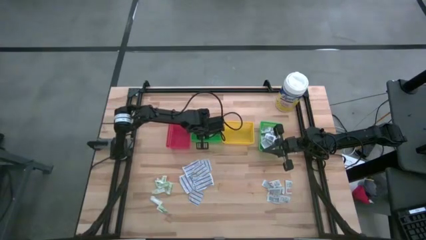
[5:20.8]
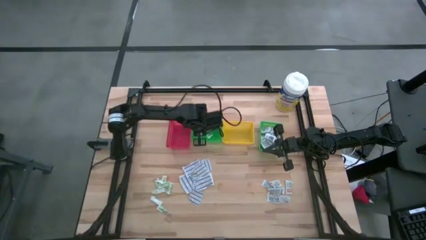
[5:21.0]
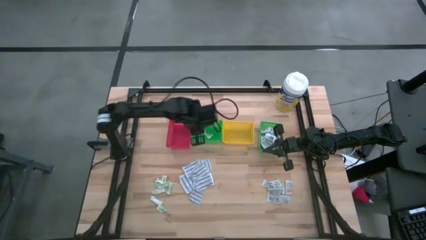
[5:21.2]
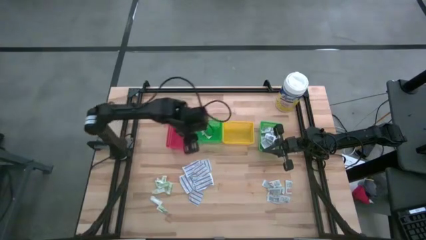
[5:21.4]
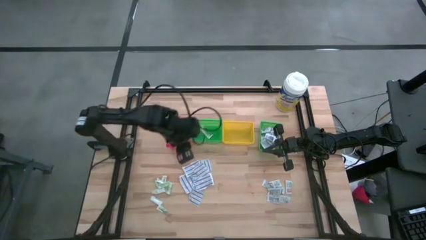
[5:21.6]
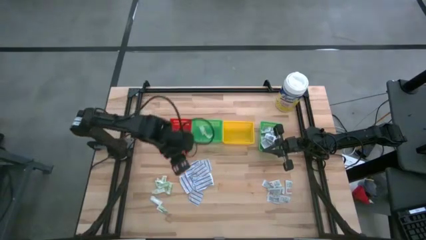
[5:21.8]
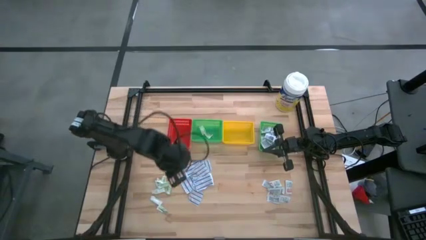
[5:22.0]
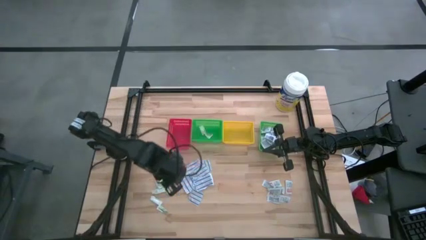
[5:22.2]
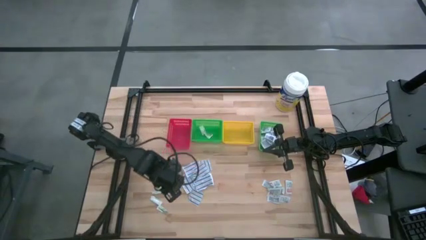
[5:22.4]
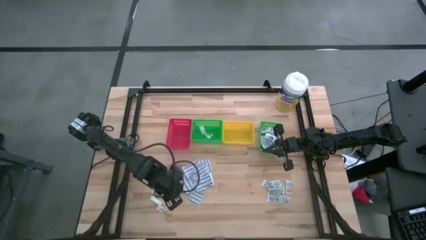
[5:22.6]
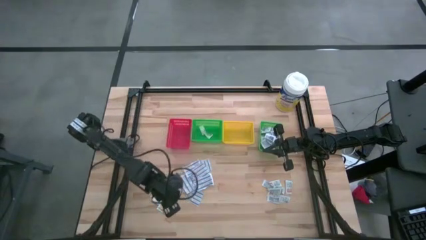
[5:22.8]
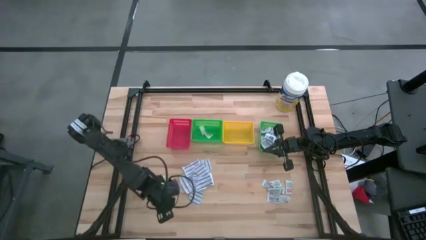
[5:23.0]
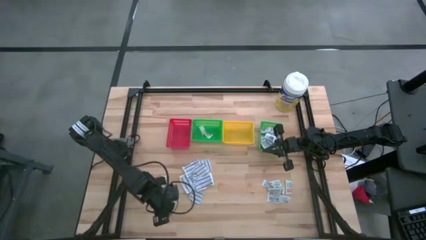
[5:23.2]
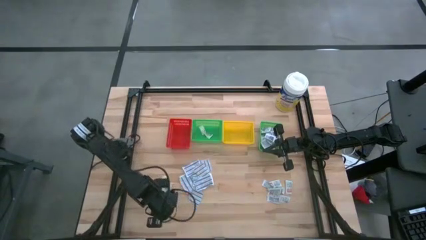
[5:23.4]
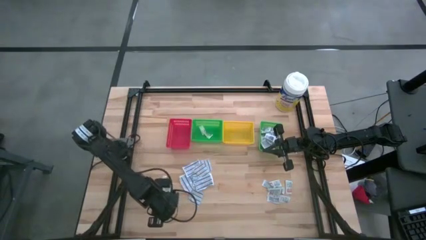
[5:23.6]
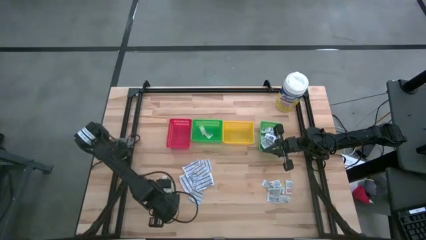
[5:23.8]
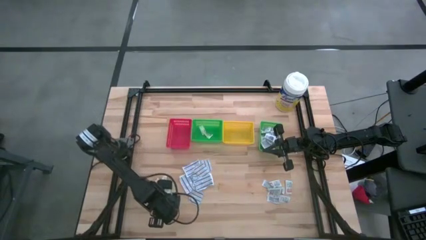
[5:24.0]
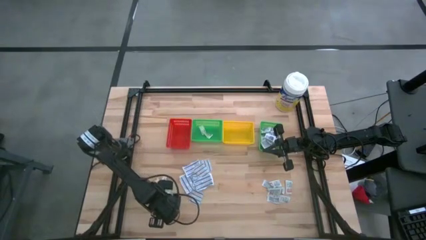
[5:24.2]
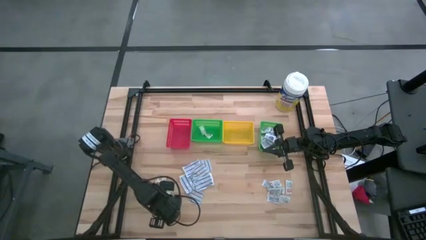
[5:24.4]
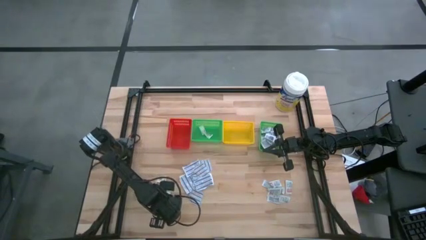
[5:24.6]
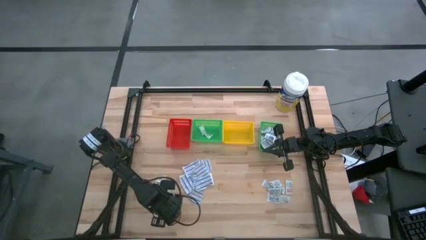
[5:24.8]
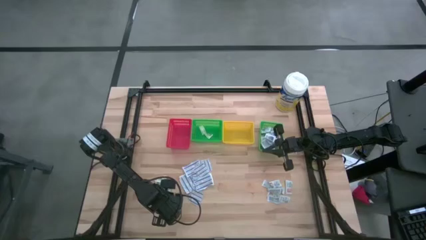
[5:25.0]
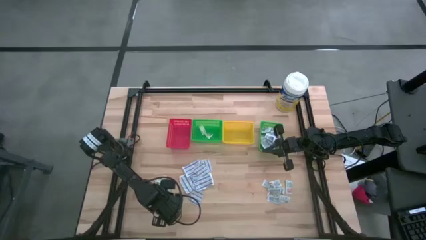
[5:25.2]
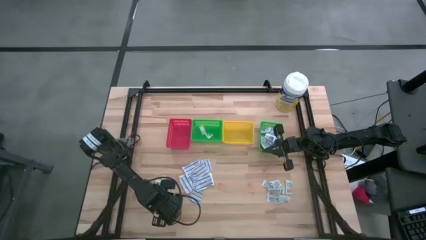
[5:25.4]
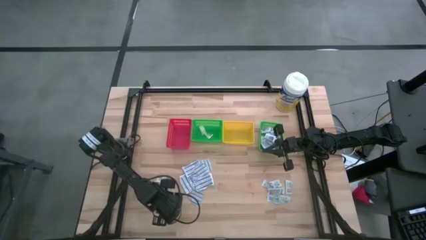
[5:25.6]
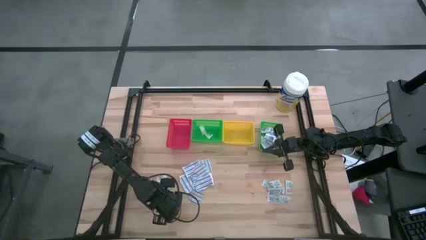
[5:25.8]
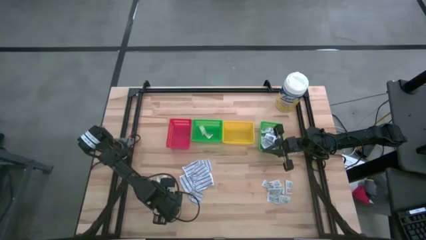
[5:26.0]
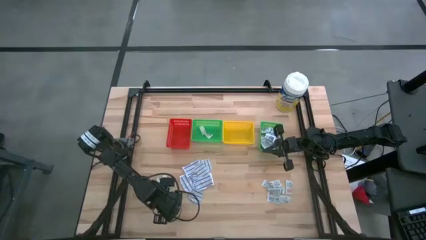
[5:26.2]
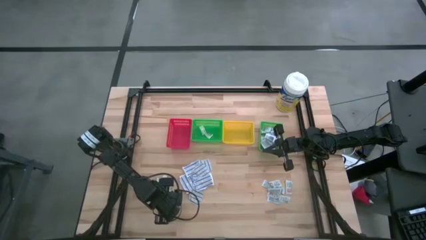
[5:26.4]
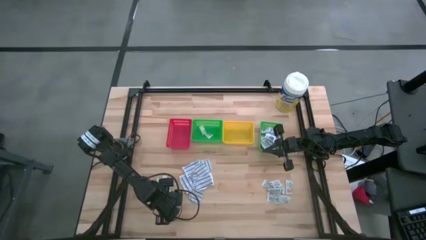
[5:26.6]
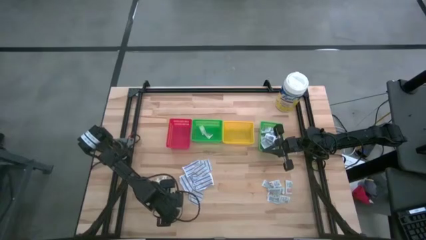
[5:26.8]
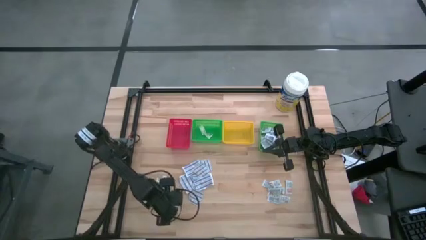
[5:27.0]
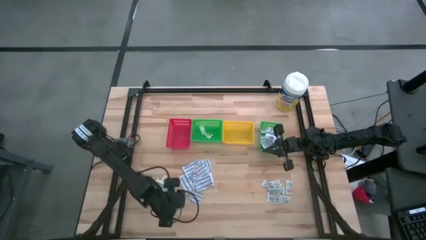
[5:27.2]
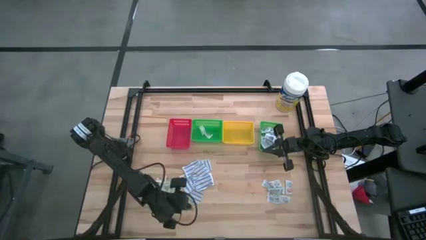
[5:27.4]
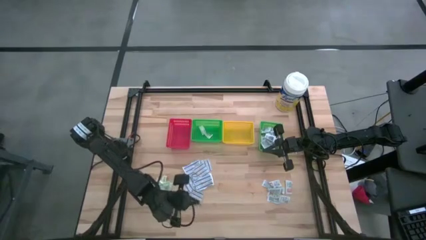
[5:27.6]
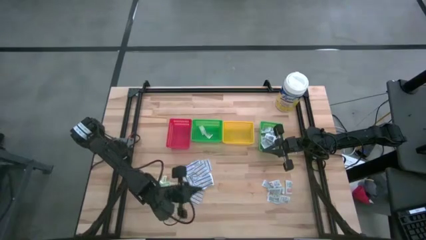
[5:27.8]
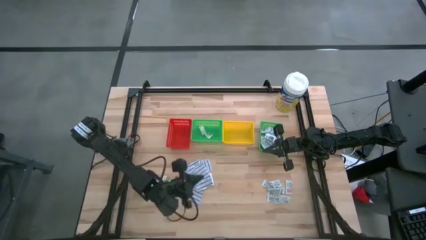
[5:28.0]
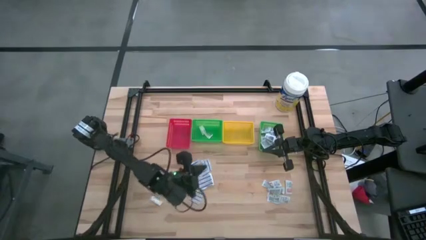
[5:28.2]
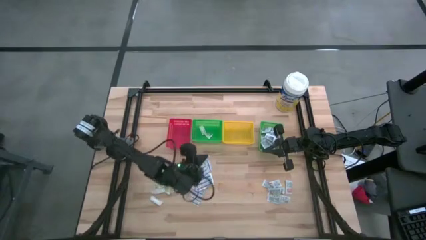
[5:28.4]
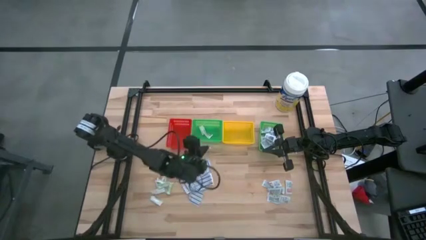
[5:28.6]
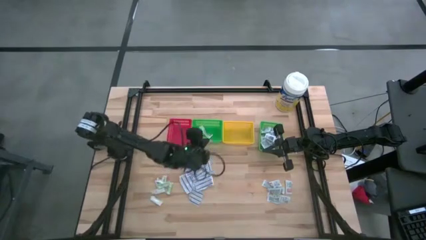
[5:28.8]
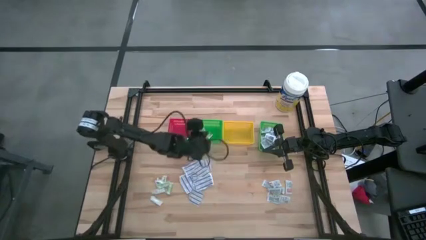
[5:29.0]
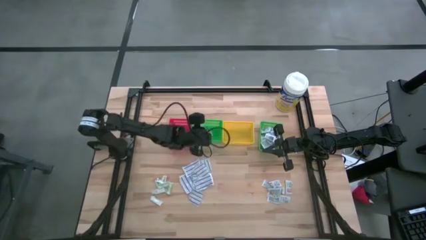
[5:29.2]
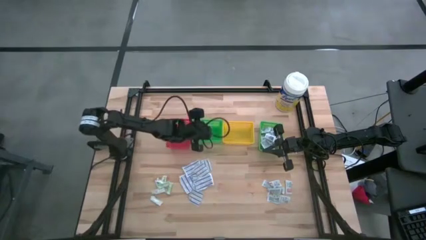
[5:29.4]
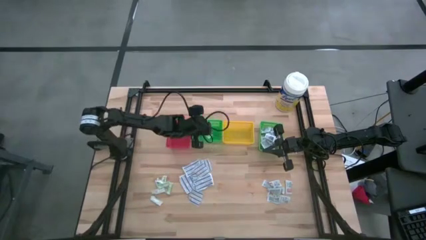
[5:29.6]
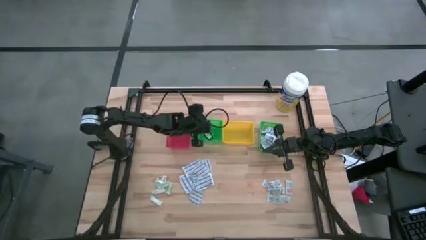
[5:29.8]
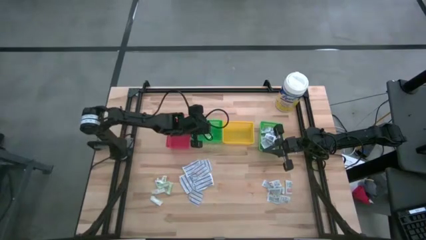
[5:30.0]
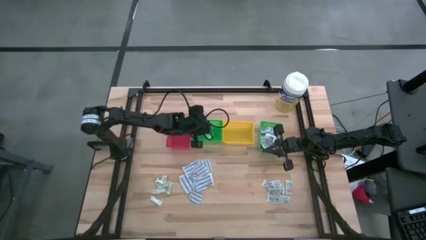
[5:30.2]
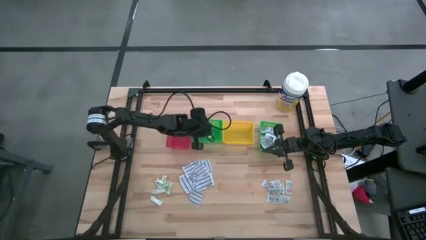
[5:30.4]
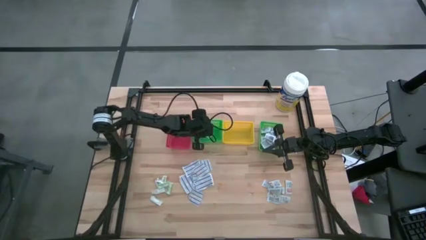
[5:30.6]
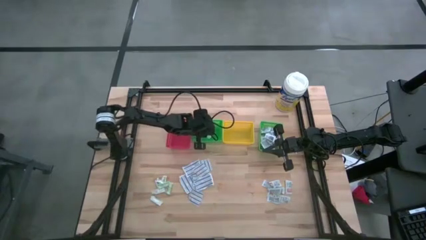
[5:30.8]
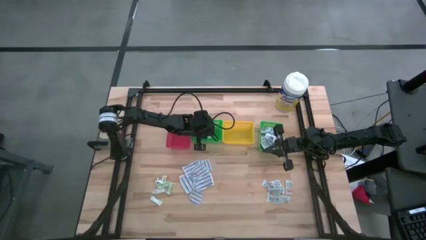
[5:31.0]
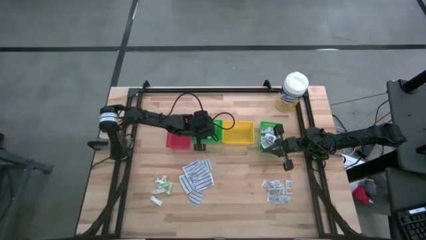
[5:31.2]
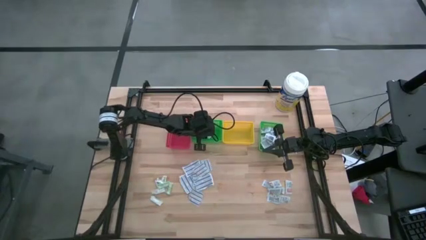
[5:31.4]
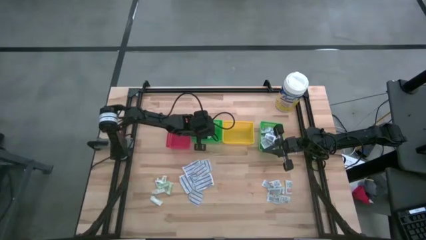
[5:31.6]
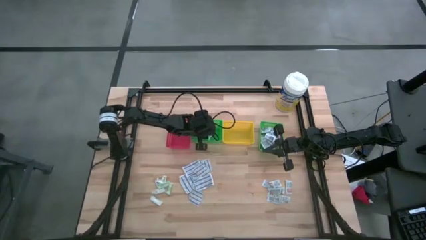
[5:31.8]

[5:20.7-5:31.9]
Task: Pick & Place First Aid Supplies
Put the green bandage into the left green bin

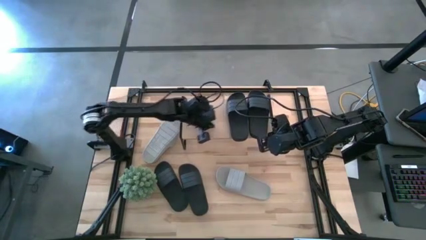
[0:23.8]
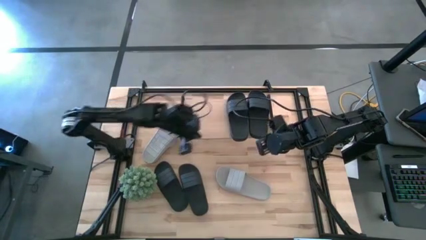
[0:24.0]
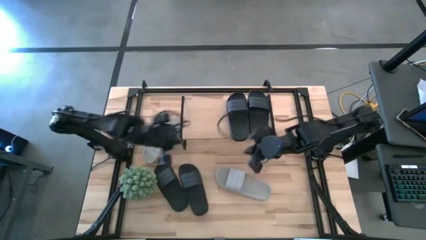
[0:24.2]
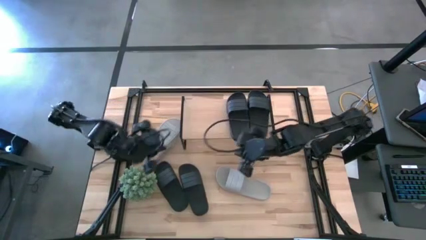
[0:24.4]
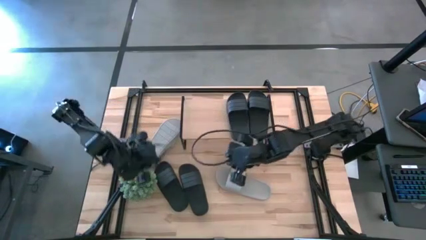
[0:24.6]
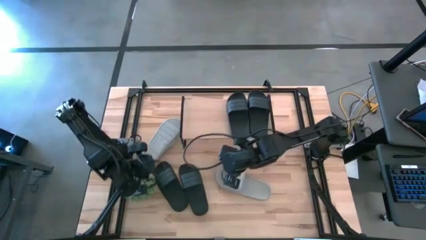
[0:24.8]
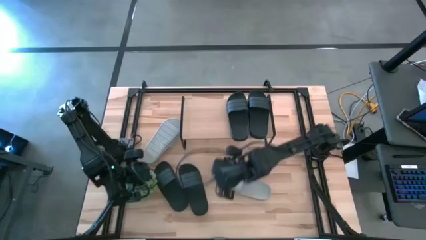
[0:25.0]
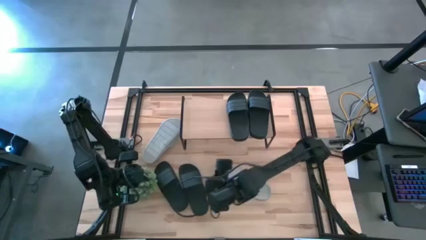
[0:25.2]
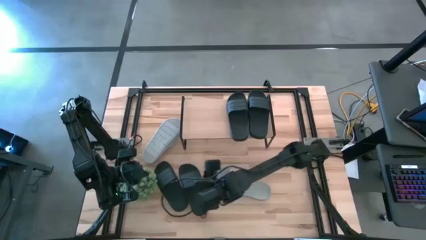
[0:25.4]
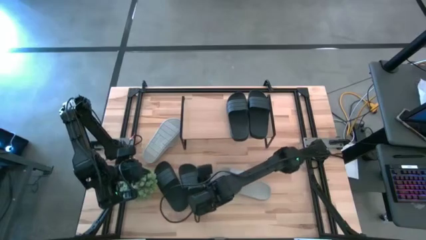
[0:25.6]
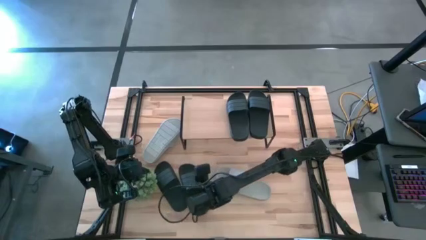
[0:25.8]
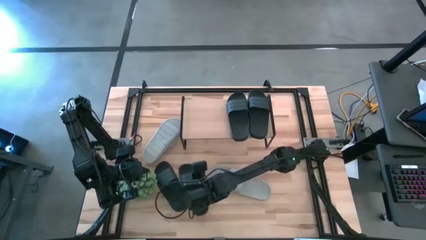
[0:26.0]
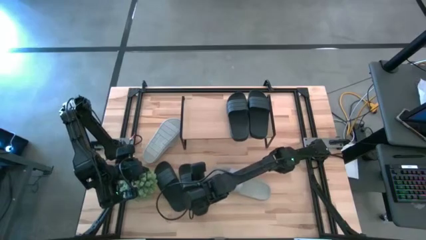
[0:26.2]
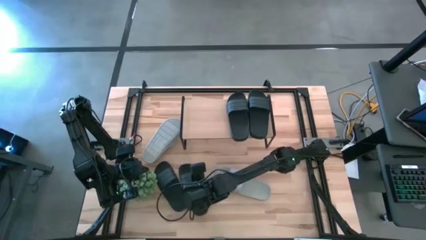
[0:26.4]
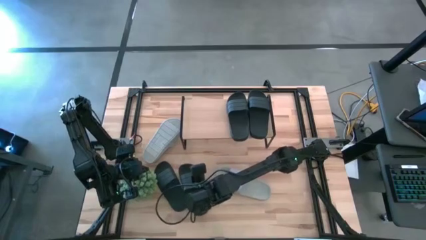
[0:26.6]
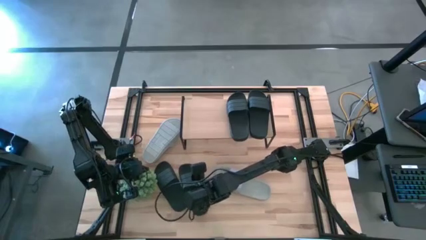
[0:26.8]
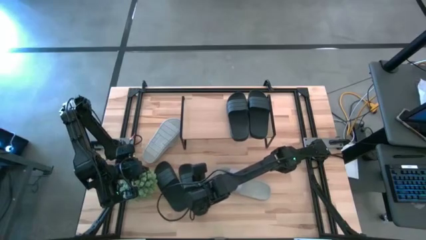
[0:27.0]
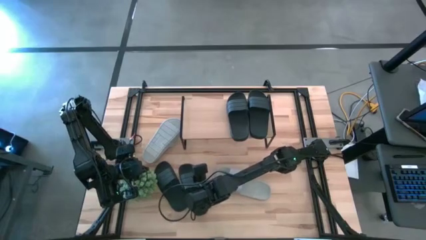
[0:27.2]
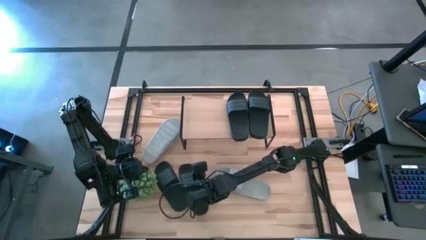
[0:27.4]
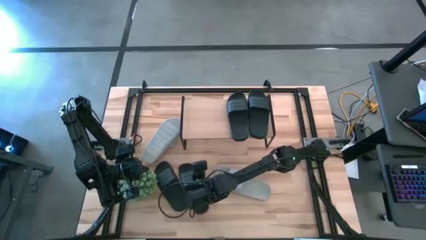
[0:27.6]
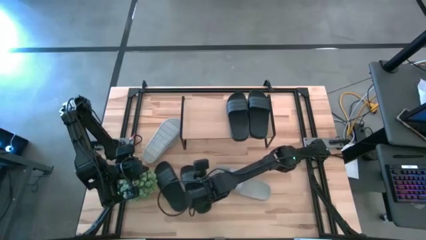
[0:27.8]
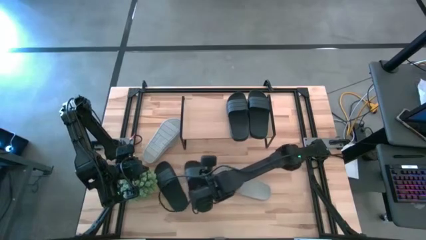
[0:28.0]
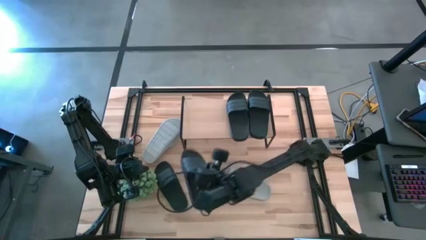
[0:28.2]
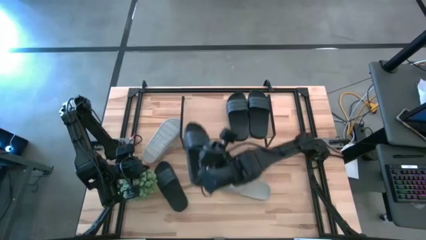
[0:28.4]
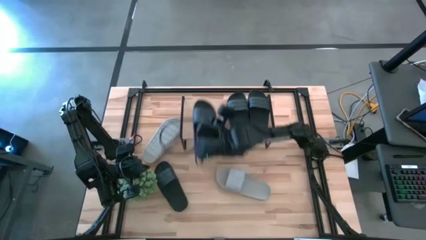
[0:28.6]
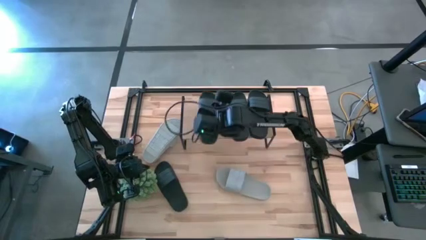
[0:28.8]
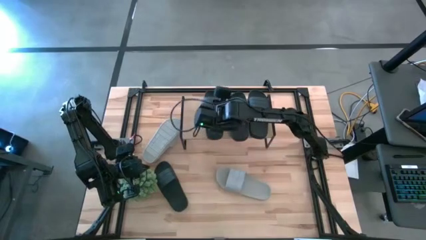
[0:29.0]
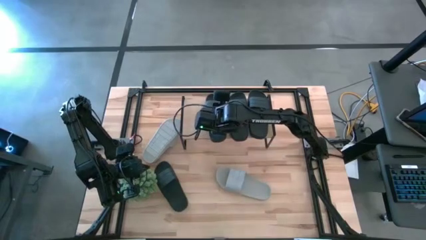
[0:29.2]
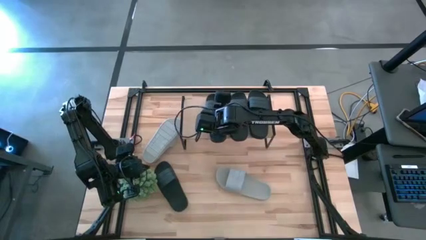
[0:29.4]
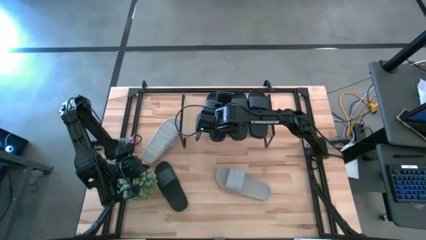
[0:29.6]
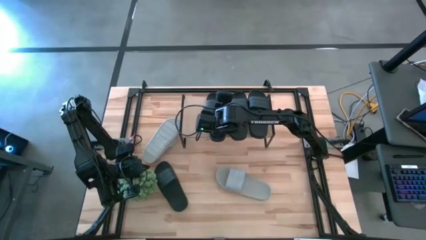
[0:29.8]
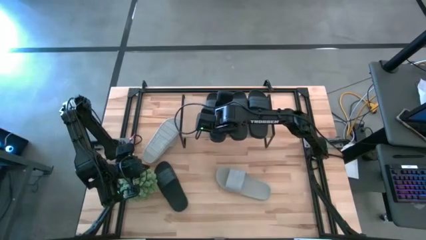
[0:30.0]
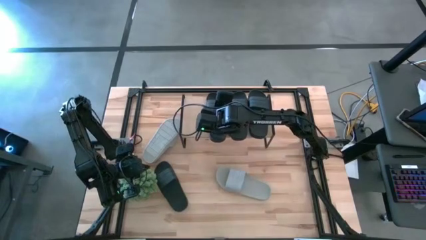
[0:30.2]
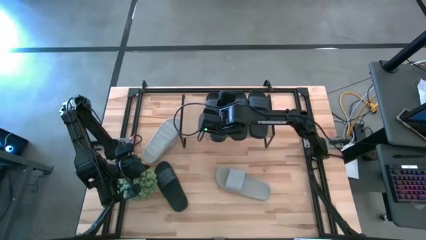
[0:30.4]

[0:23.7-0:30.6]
Task: Pick and place slides into the shelf
Put the right black slipper on the shelf
